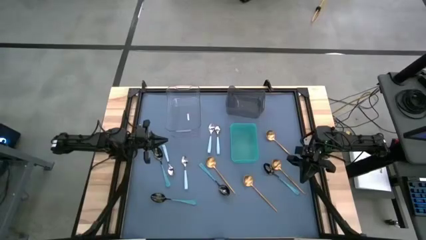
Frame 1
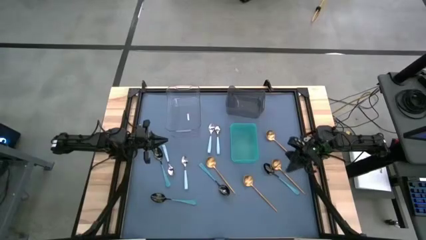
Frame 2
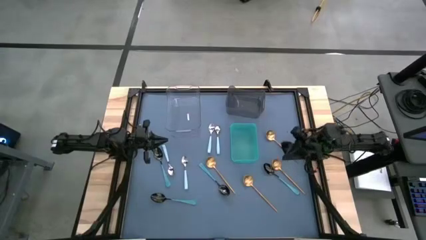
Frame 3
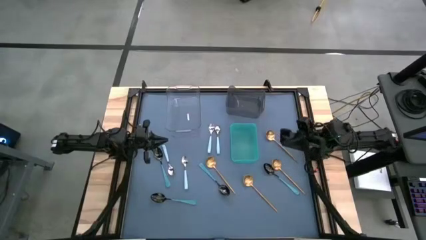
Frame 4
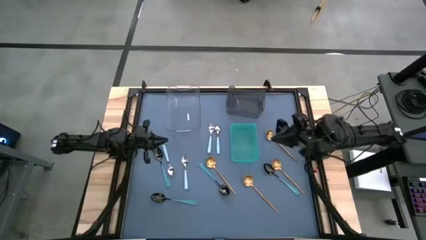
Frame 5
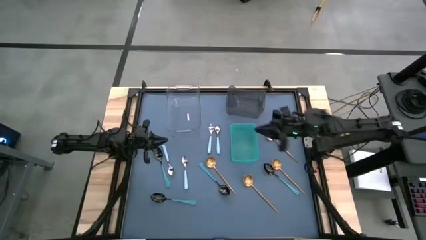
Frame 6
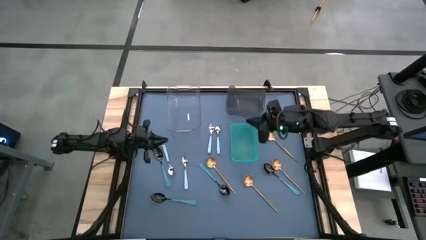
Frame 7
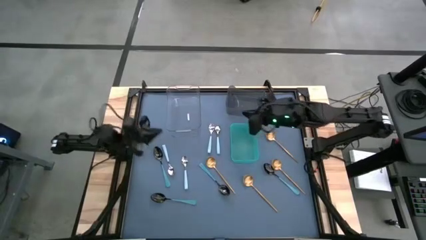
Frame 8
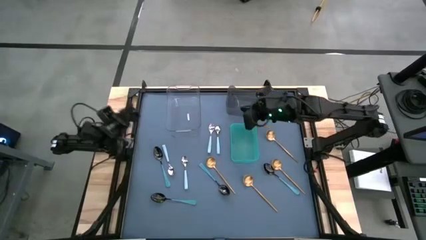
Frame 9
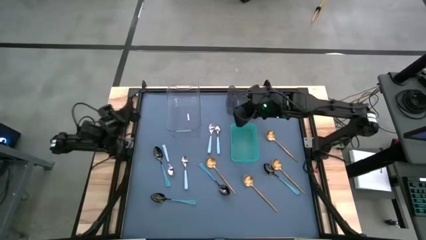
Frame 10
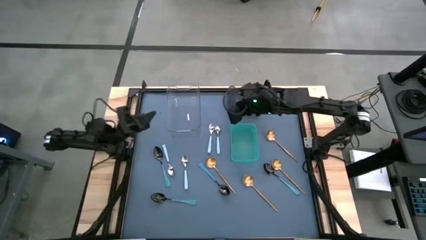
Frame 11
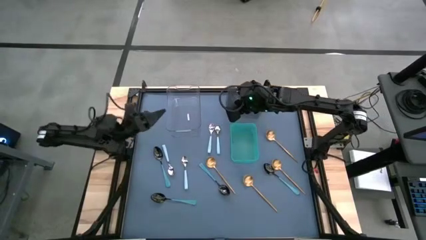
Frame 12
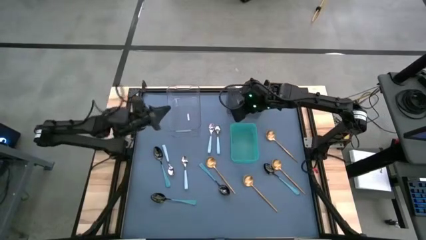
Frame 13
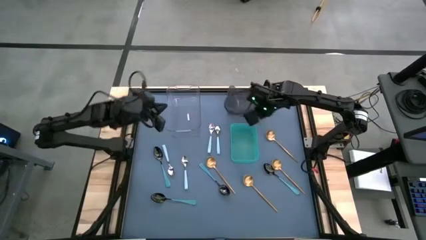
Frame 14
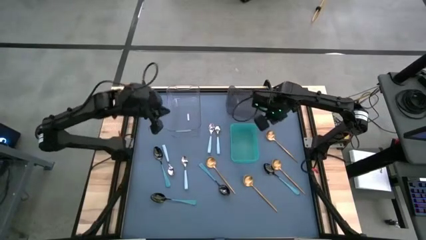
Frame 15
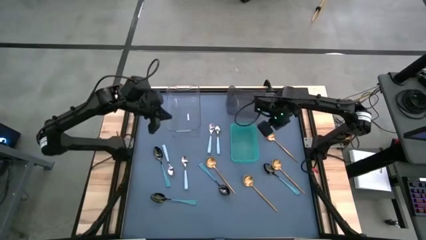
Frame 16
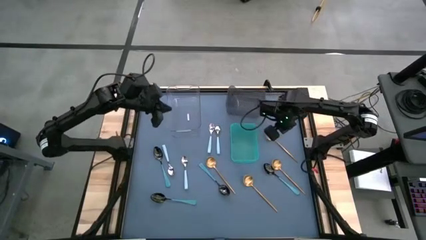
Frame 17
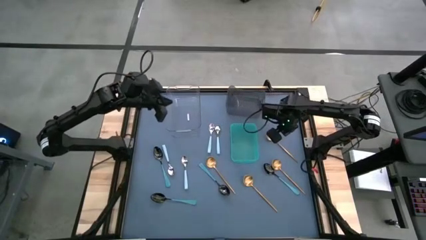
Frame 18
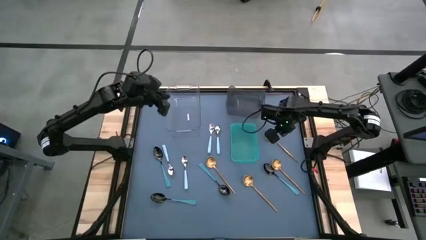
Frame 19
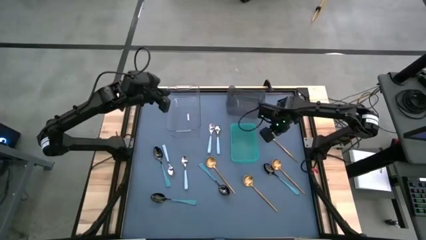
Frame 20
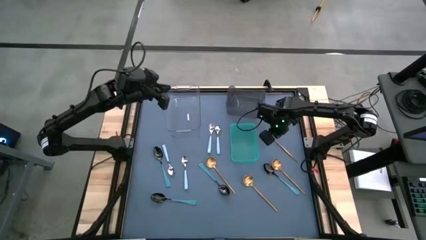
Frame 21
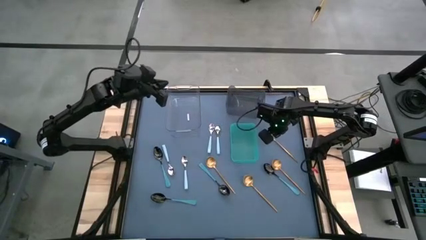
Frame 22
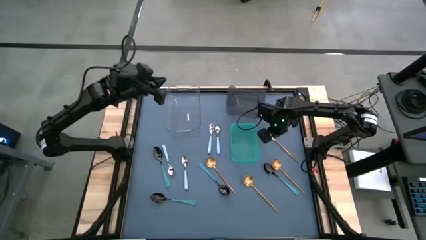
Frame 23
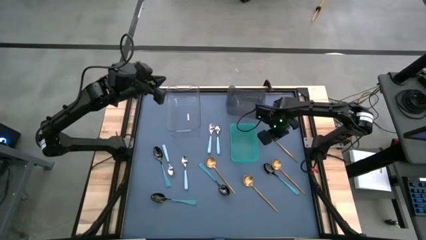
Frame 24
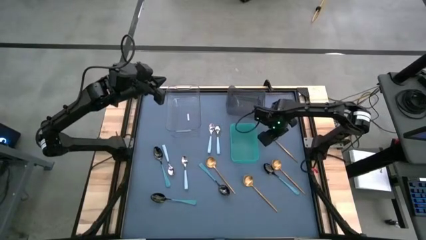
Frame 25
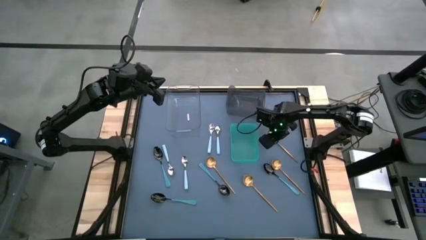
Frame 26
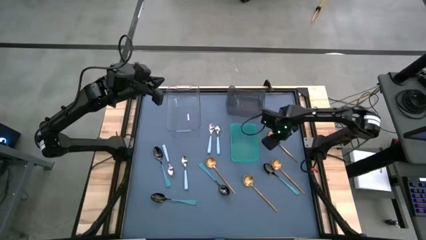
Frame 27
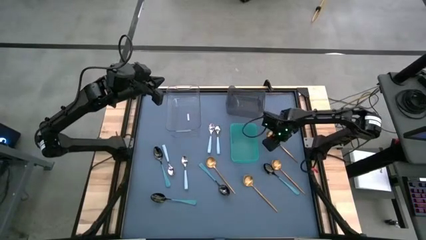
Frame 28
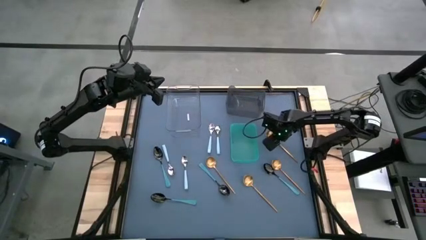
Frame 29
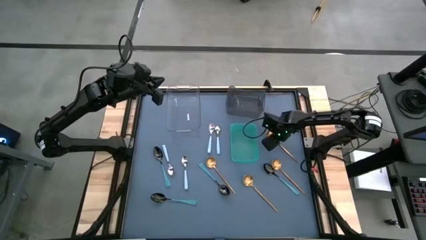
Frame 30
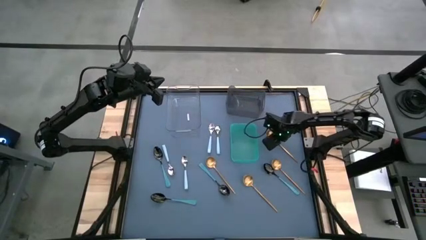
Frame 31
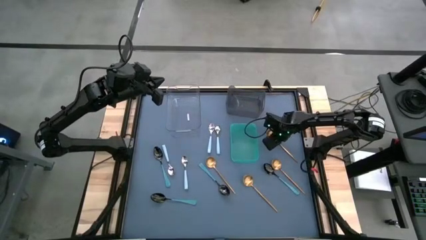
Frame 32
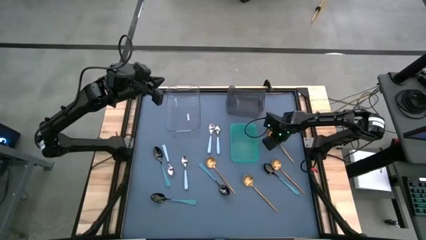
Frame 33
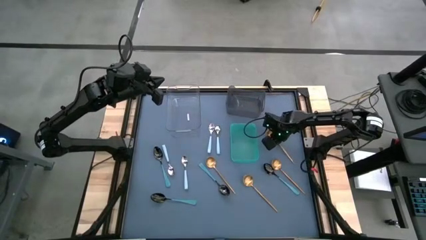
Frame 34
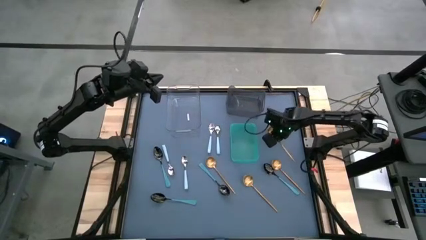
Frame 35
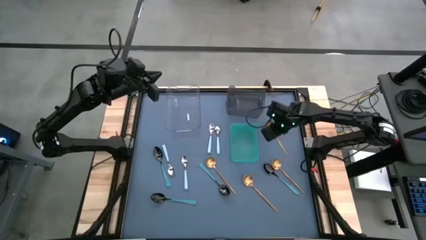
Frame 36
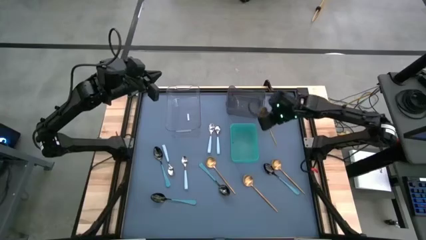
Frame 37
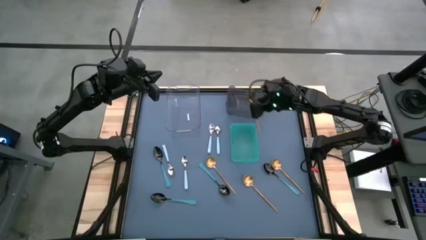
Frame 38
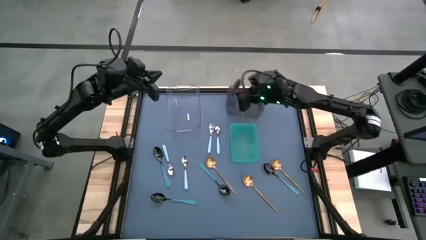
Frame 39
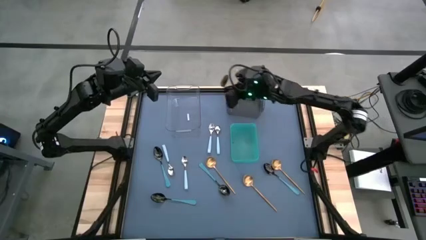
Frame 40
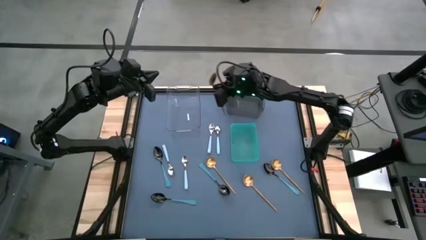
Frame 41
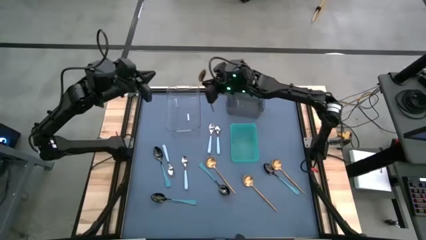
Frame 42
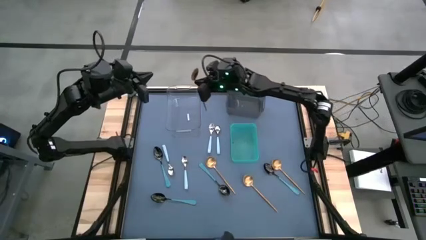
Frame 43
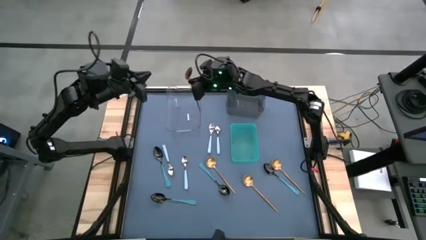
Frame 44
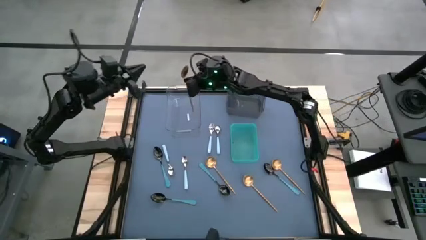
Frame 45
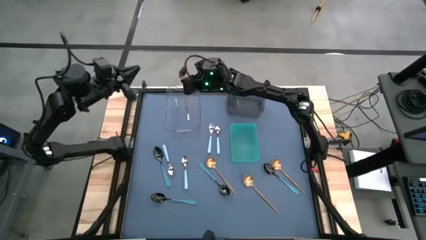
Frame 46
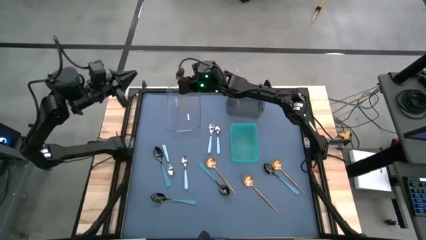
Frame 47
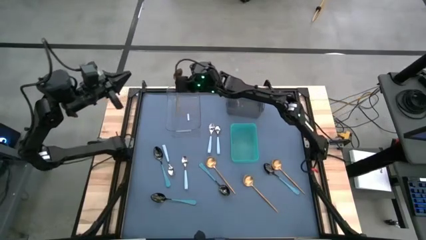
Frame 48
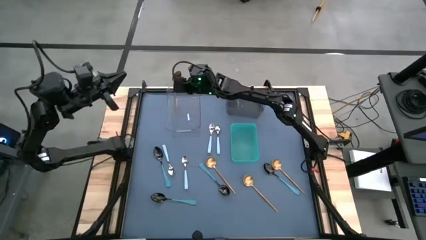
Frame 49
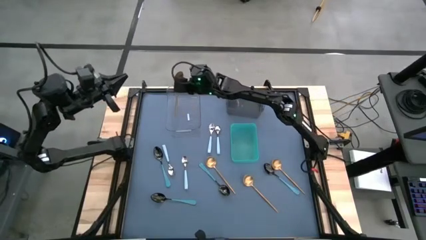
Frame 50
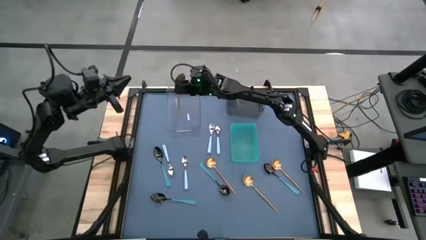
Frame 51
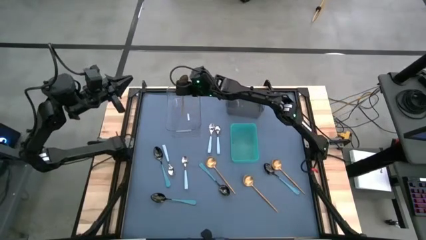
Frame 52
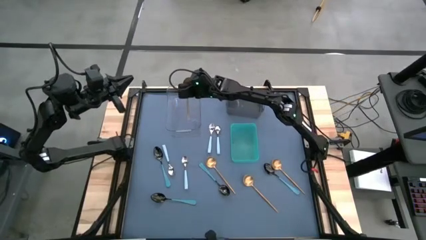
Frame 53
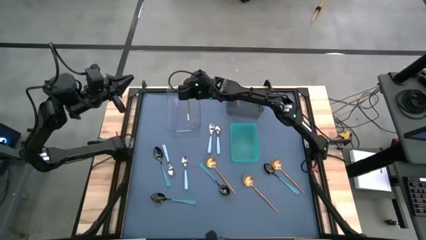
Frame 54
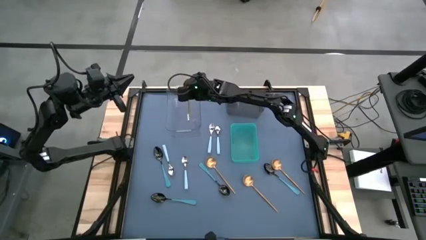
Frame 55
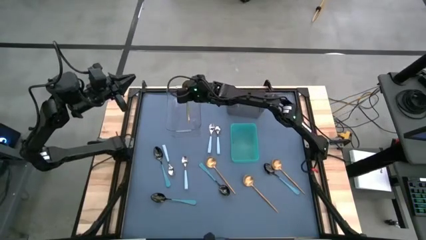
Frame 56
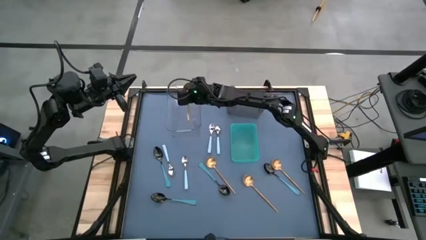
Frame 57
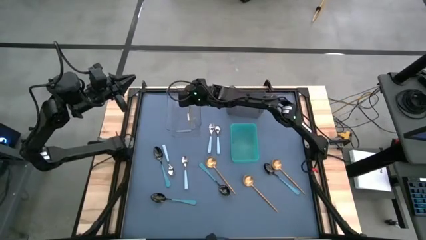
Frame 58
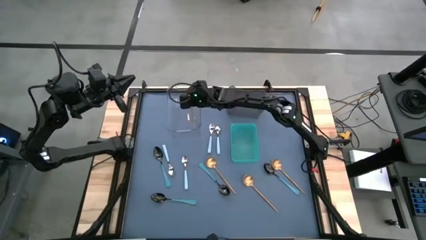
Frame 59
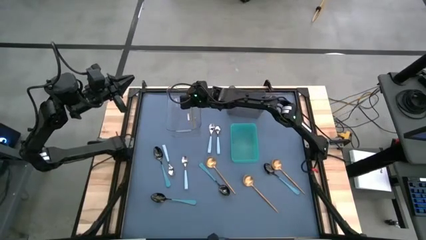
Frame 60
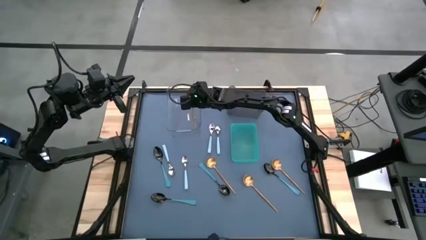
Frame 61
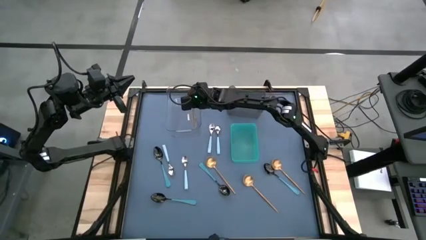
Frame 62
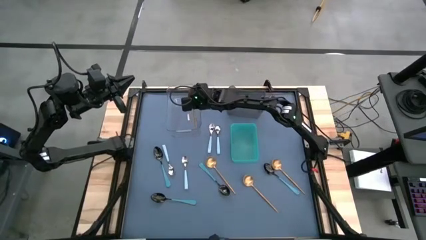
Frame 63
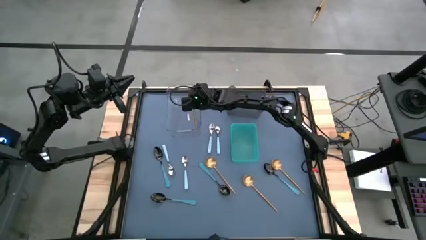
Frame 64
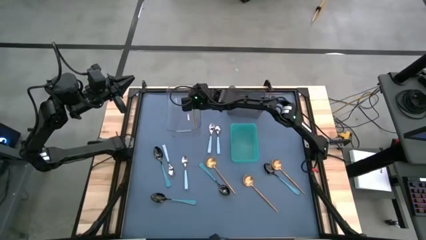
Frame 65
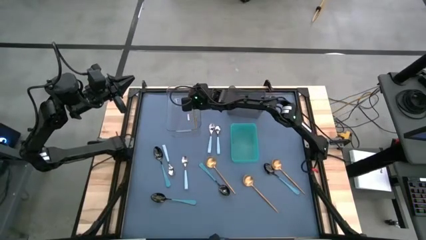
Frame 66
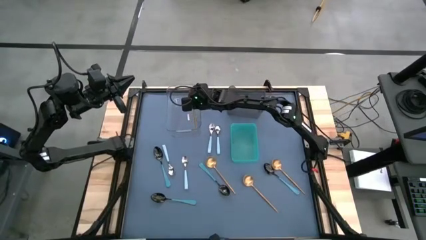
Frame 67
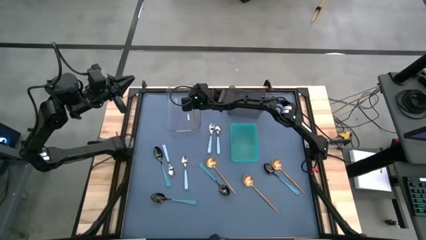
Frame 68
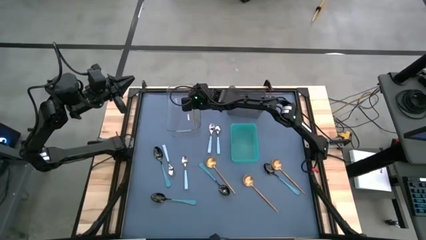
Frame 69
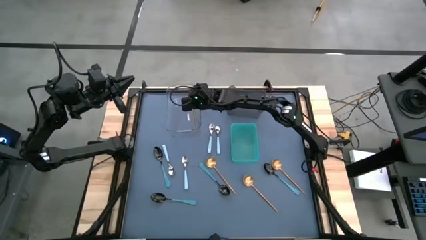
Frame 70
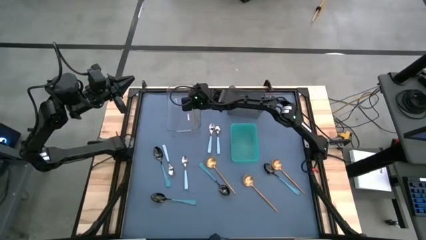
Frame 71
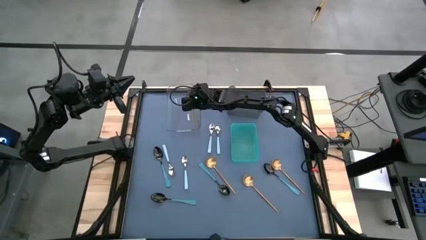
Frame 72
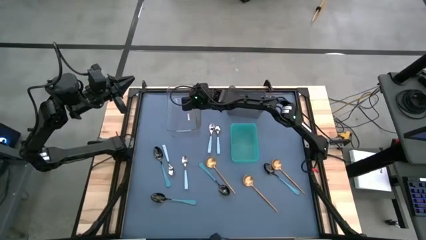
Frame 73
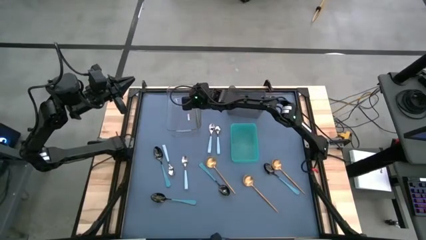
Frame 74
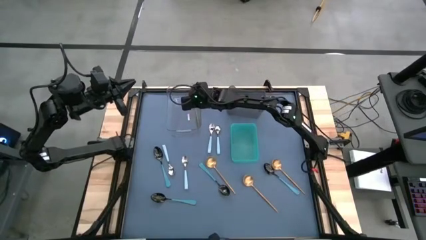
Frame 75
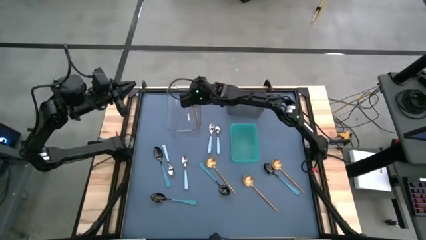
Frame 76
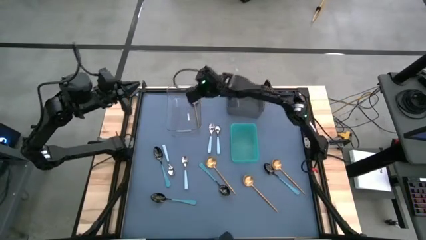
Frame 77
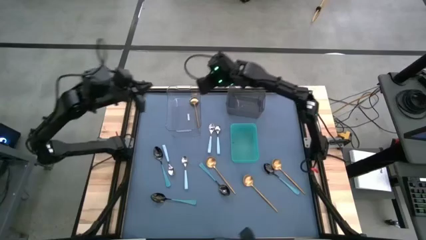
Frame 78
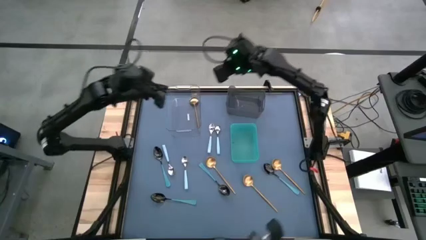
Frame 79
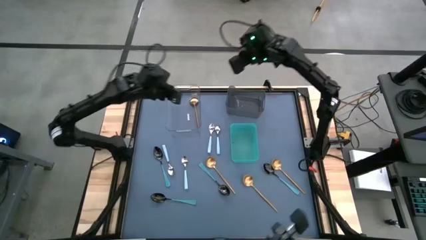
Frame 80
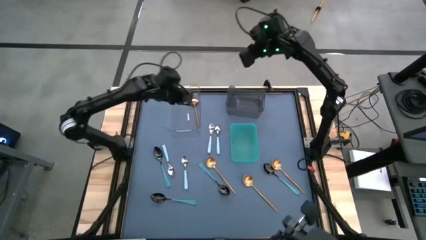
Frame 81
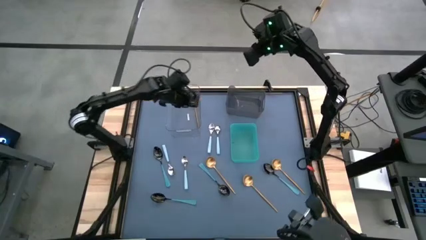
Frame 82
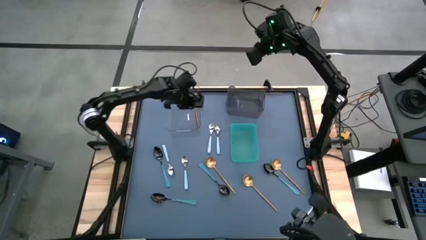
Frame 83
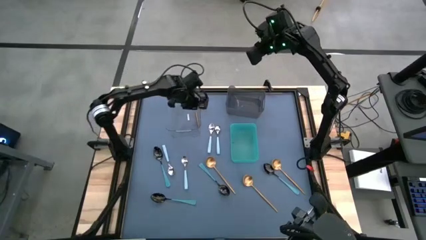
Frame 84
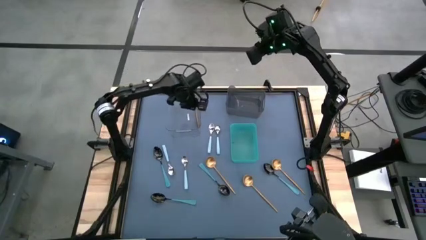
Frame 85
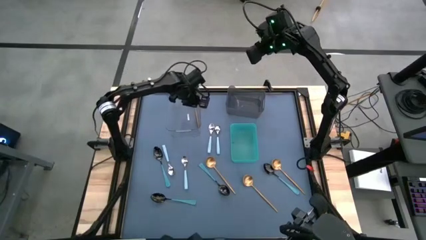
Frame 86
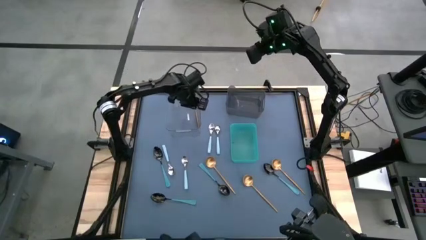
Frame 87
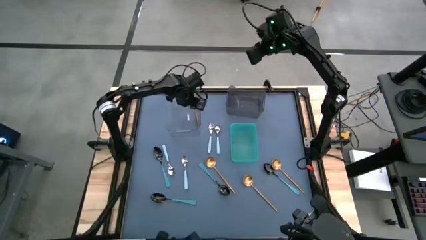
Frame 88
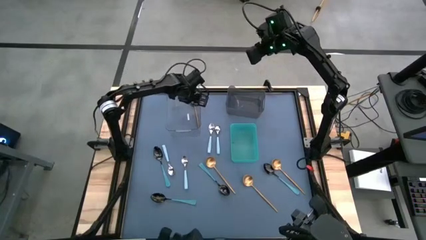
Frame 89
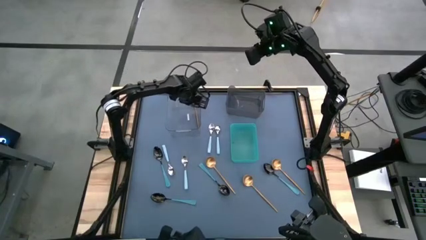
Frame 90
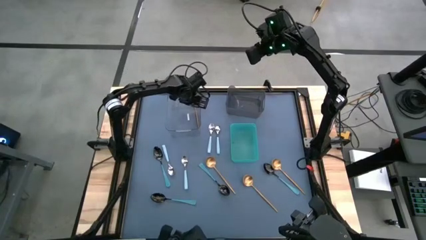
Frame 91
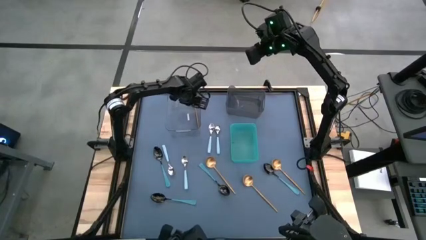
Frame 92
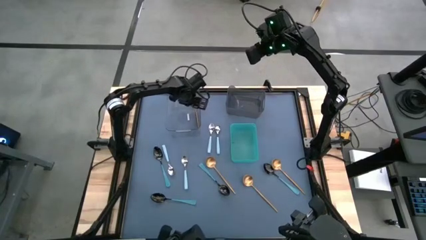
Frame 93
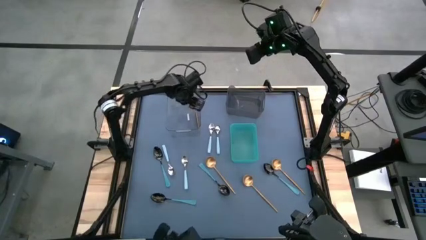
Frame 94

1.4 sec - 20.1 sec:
Task: Sort silverware by color (type)
Put the gold spoon into the transparent bin
